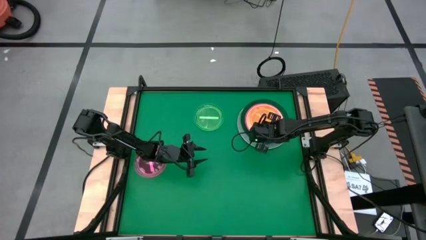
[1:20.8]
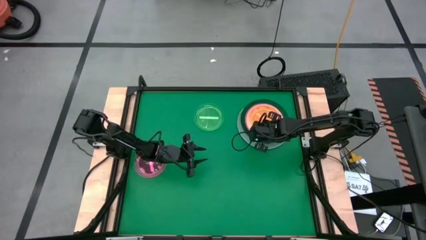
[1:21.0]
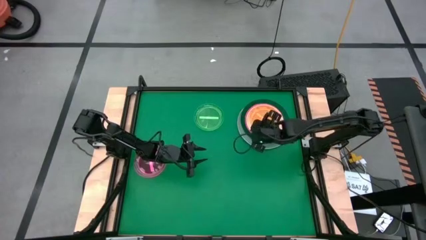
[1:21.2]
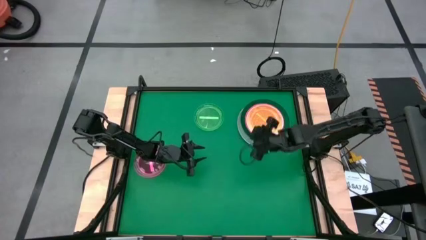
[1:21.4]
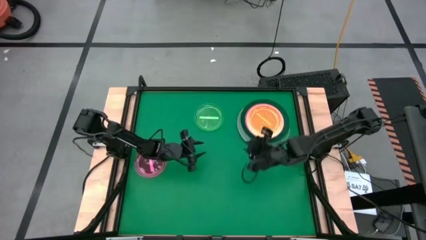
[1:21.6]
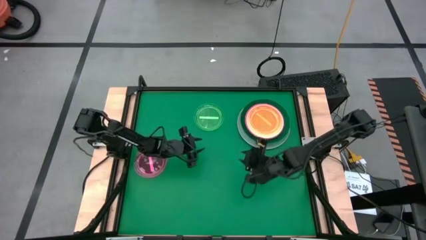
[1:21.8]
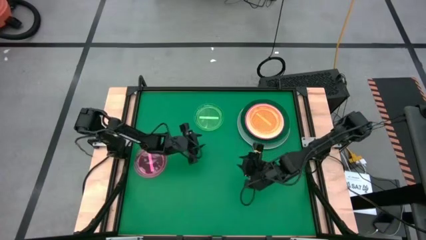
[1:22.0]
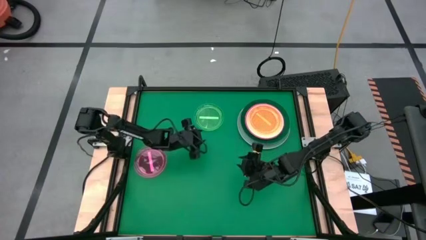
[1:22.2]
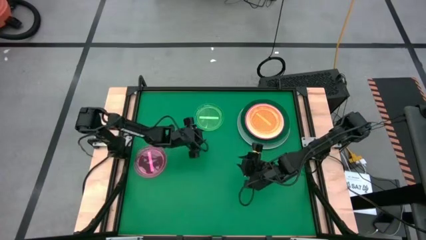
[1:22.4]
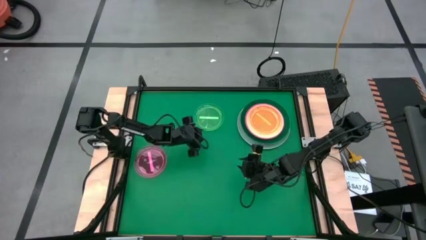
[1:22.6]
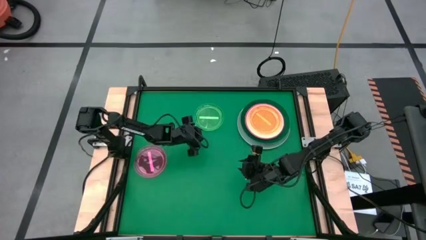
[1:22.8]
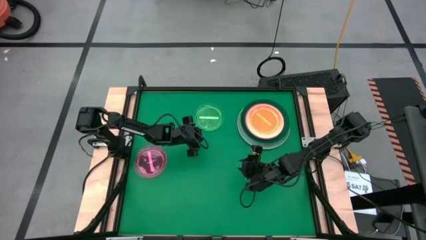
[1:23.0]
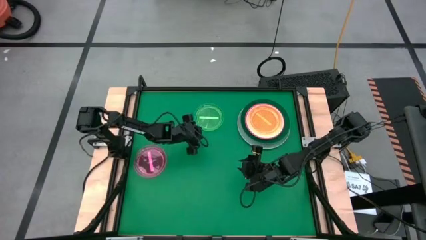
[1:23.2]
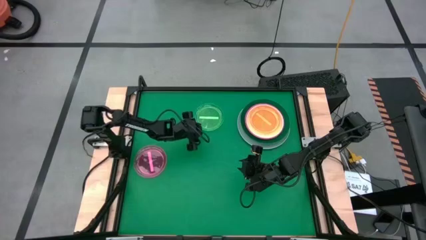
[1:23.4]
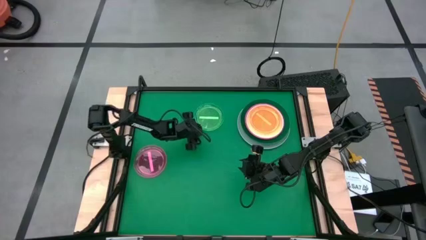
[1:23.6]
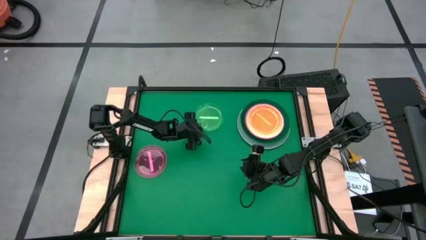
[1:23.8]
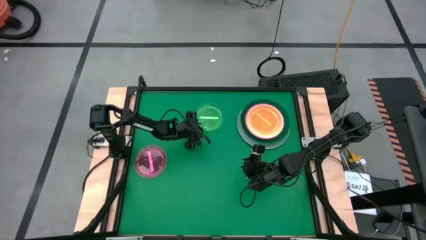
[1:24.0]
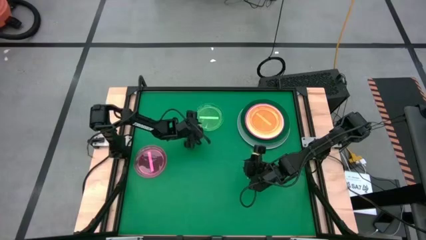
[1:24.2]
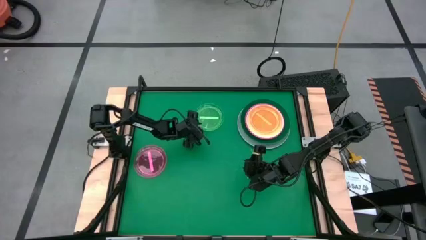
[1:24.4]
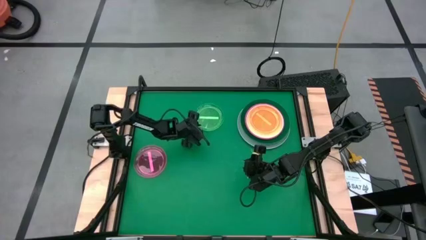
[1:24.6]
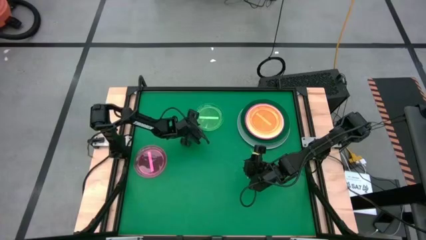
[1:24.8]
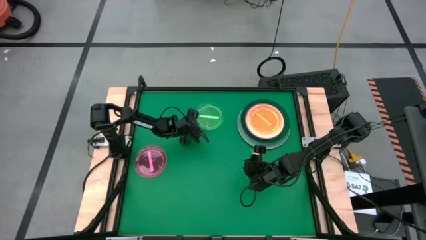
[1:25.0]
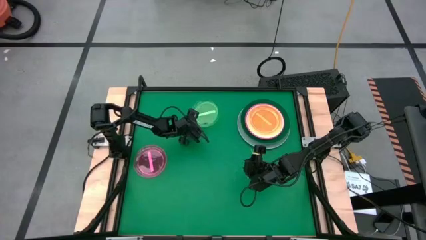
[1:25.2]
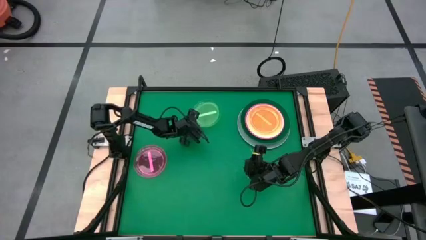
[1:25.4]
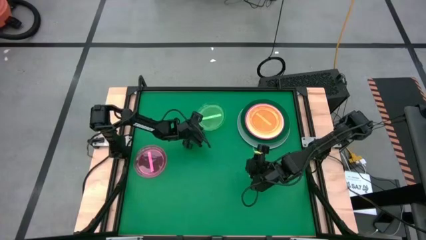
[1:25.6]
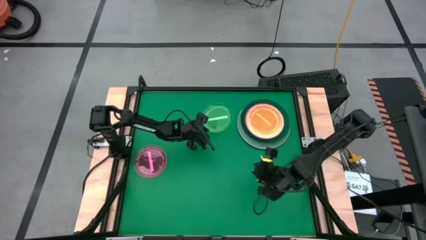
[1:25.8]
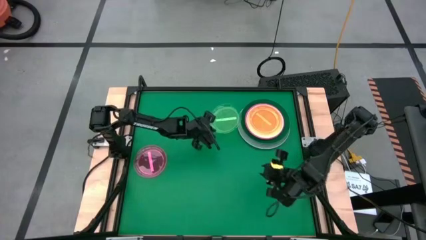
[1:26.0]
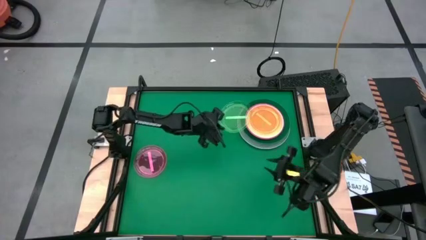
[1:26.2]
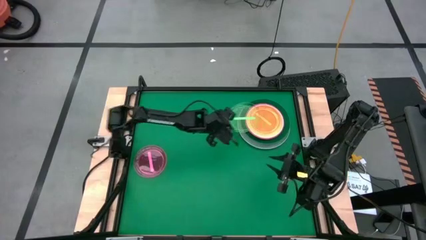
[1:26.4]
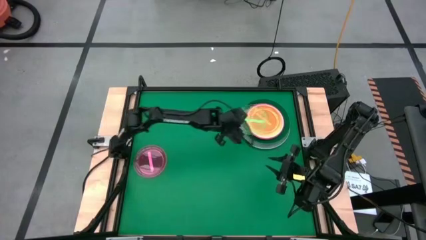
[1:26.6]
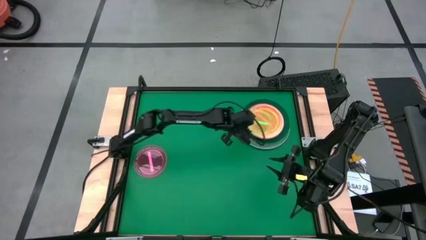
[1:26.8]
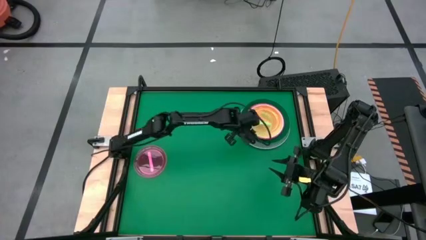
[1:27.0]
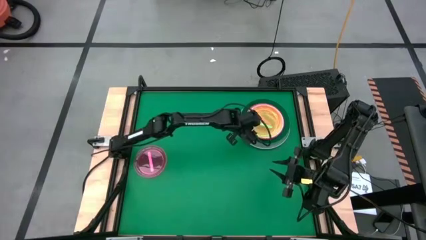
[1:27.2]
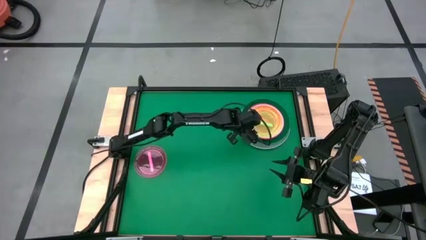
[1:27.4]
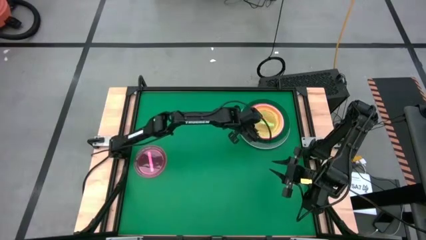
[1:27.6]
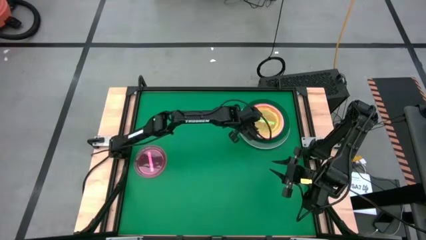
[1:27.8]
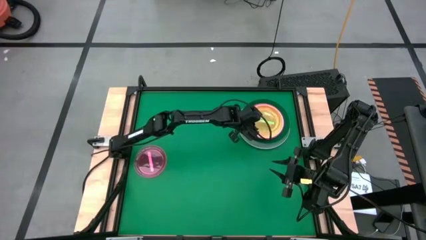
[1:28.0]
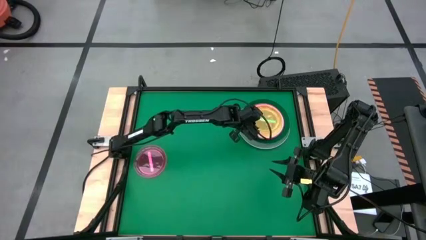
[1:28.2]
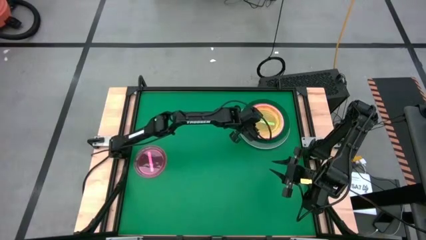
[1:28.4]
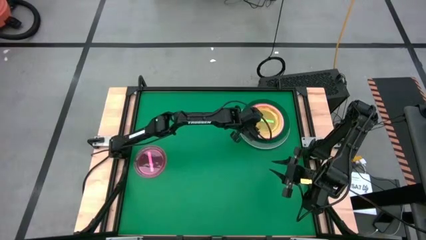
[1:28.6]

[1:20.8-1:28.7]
Task: Stack plastic plates
Stack the green transparent plate on the orange transparent plate

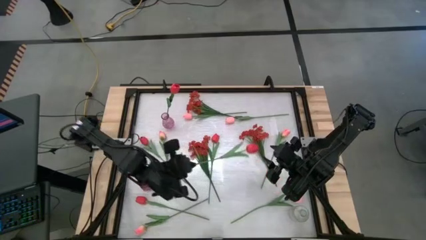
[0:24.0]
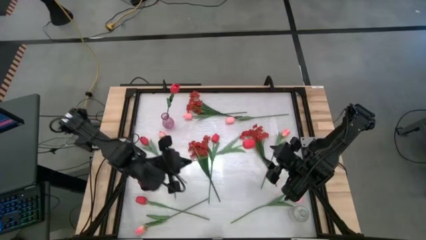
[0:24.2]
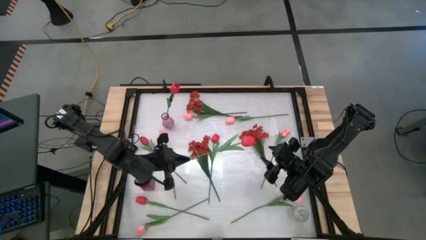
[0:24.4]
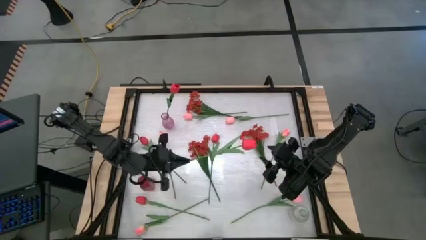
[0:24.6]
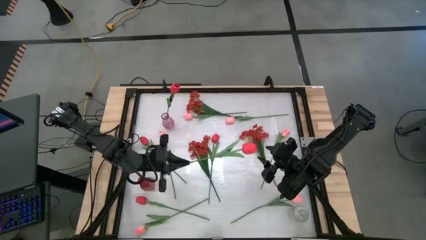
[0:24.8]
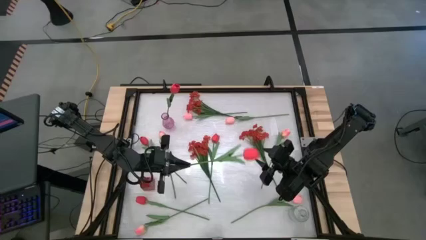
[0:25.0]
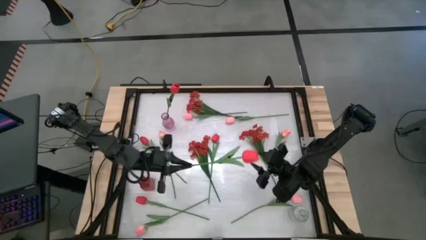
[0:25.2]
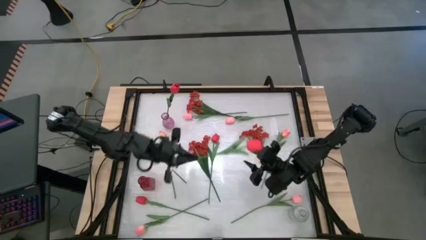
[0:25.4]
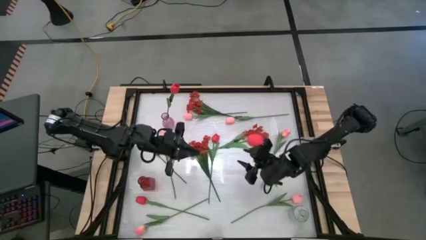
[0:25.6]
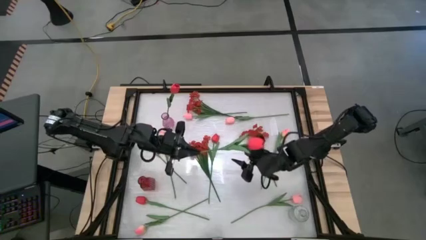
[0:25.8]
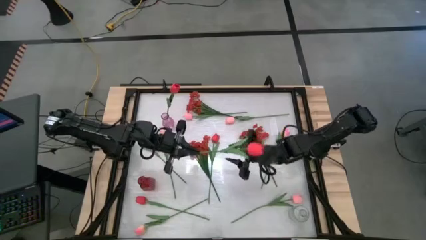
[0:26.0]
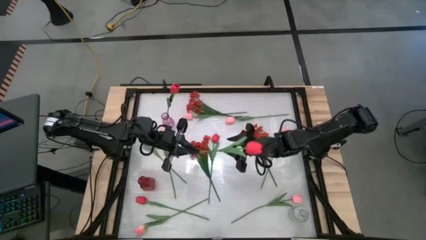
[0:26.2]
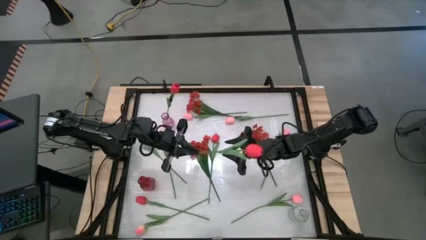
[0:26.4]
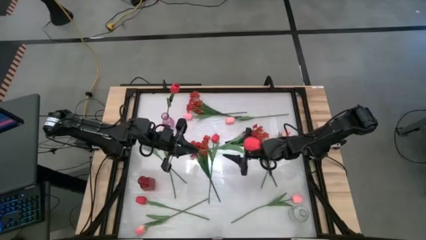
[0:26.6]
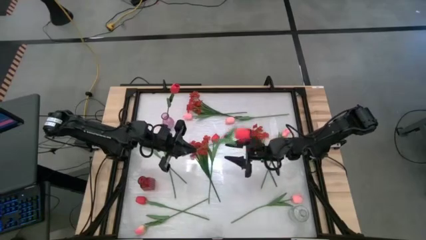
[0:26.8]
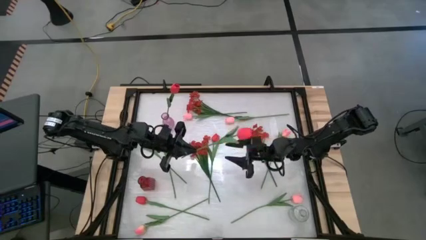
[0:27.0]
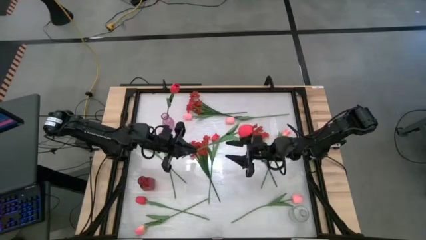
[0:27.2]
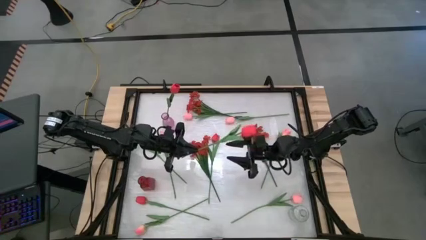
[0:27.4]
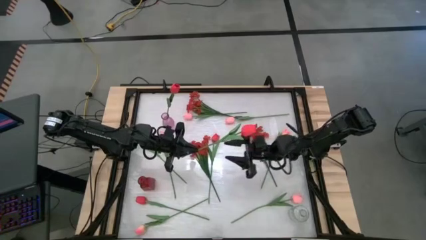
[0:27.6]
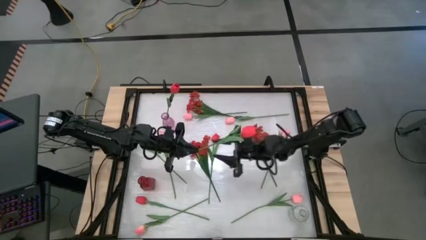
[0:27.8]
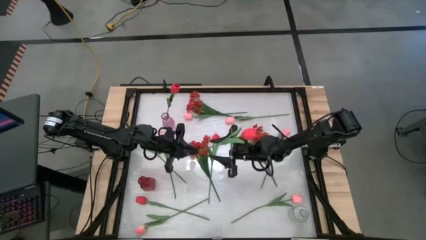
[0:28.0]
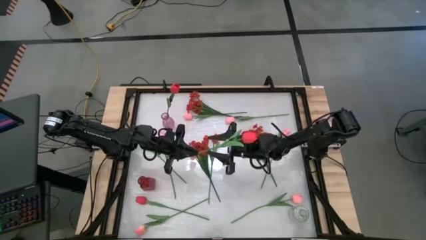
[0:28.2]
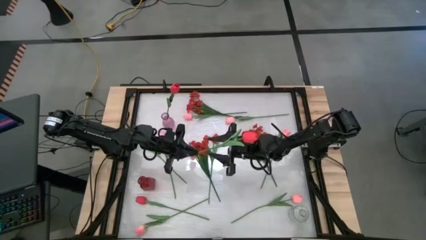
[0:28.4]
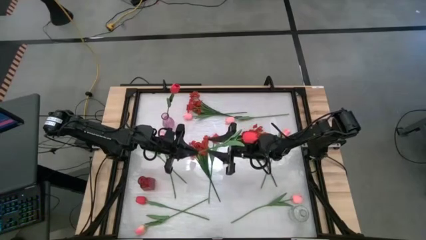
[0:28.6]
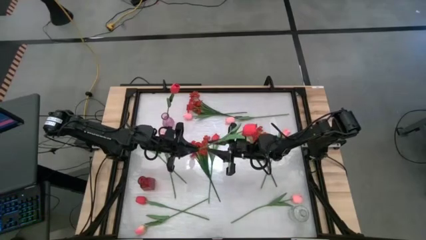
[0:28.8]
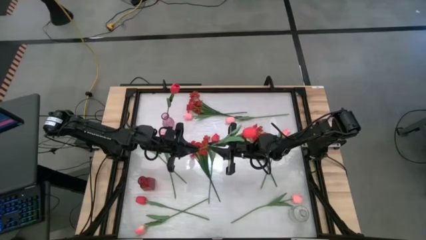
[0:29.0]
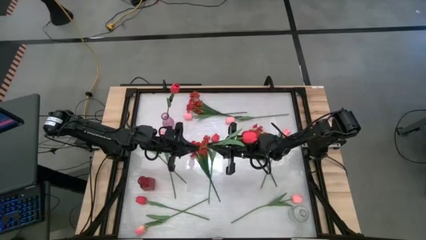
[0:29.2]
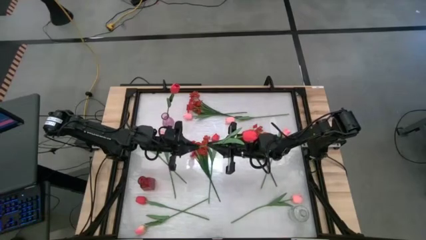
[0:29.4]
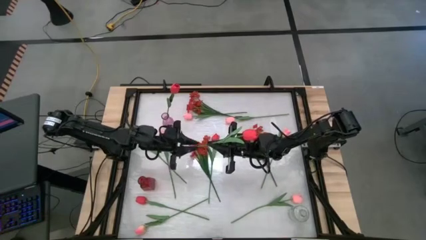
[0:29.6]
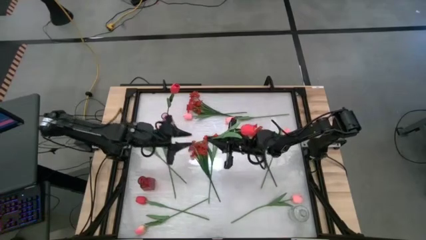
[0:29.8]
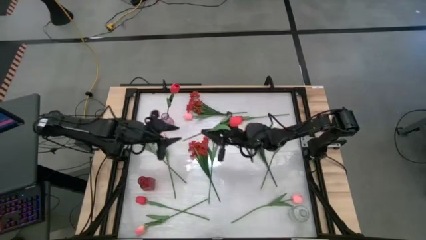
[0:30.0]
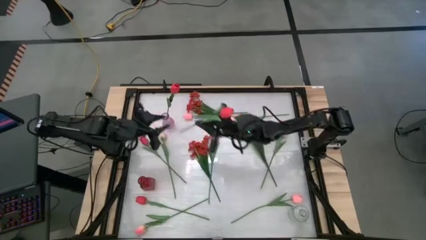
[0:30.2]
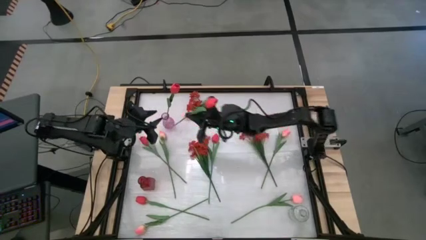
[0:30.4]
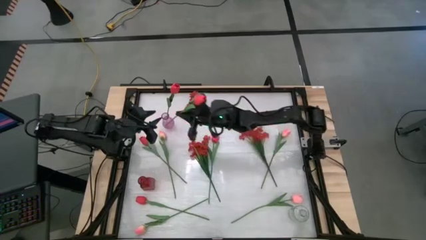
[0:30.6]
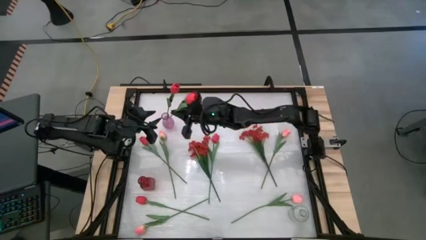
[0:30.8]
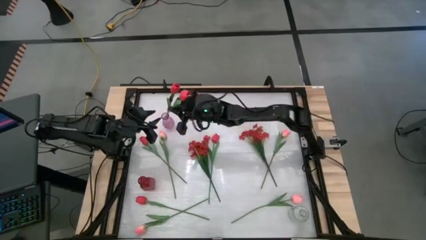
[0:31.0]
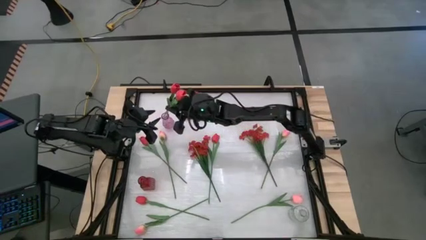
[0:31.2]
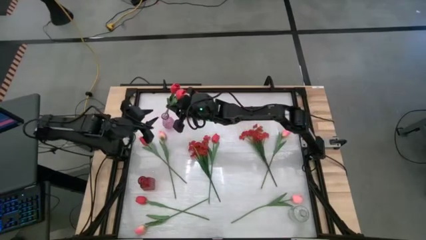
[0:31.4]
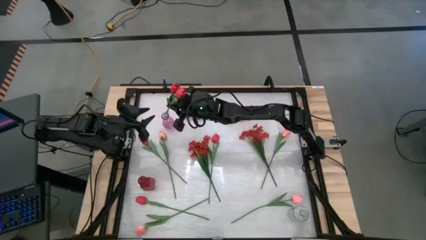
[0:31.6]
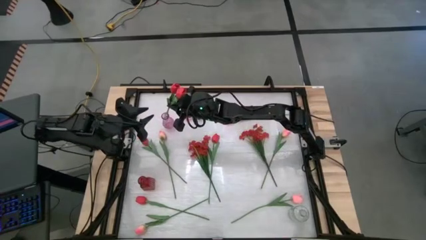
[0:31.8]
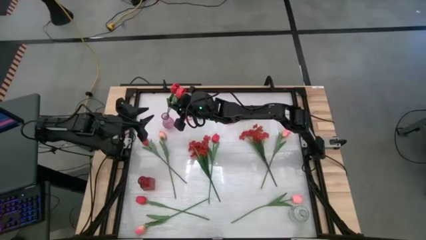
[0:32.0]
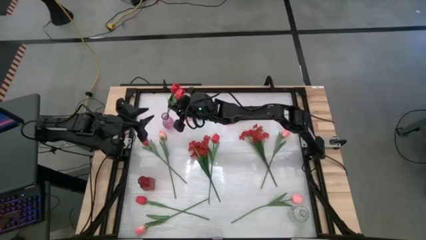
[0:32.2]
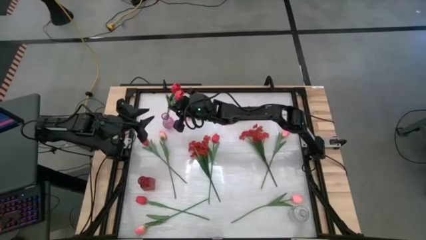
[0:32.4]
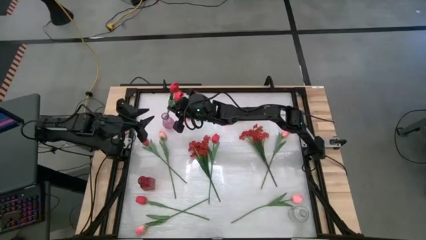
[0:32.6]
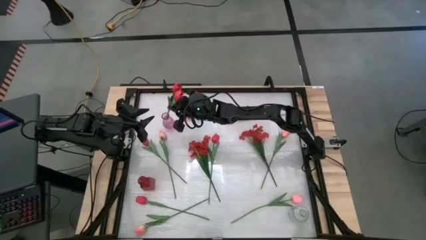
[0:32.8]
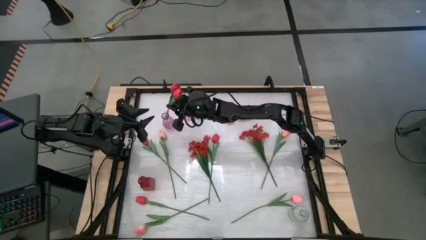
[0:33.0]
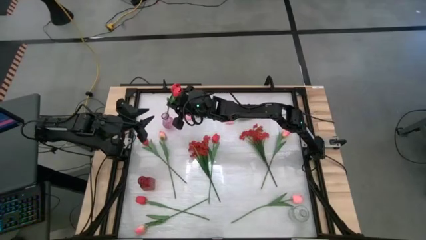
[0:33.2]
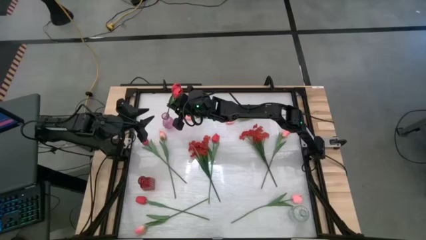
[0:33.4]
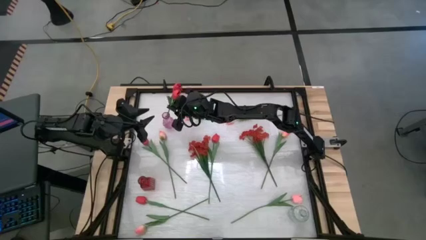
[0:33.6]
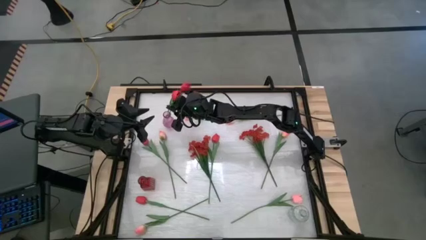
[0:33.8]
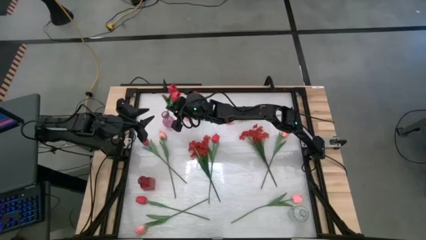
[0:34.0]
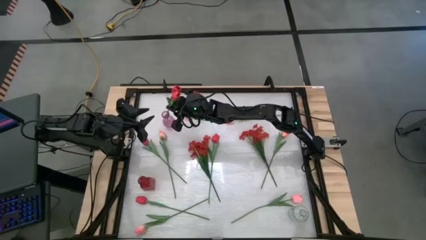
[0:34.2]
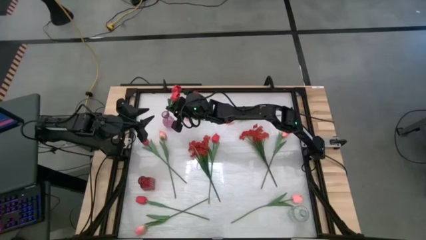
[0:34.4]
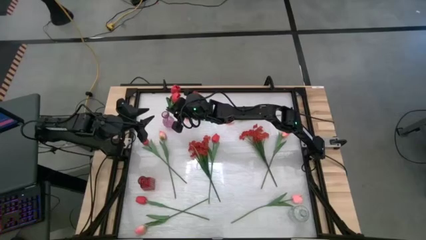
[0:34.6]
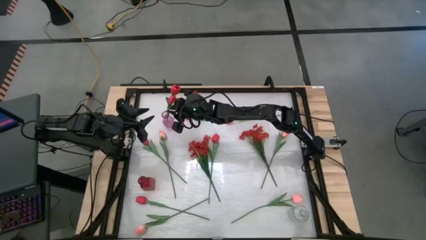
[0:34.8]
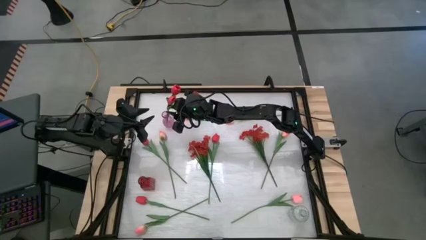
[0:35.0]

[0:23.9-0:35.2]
Task: Sort flowers into vase by color
Put the red tulip into the purple vase
